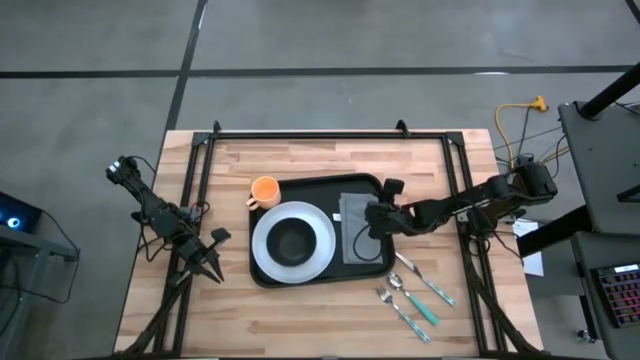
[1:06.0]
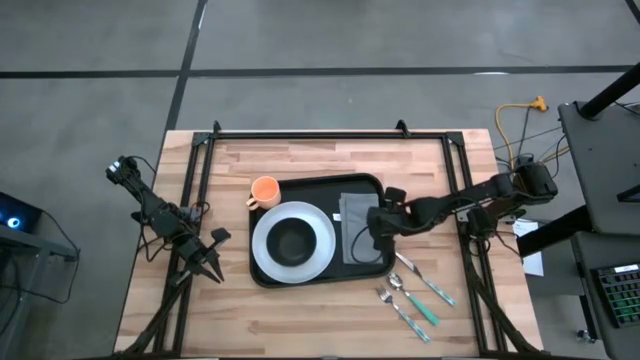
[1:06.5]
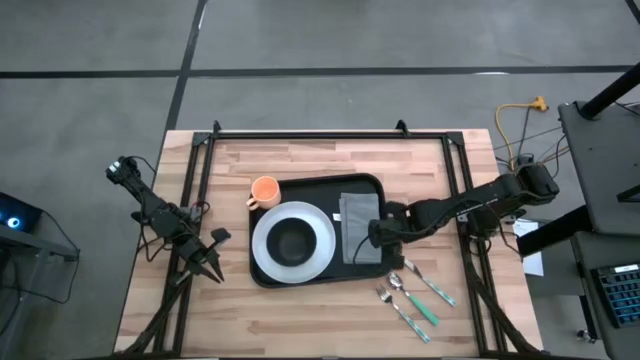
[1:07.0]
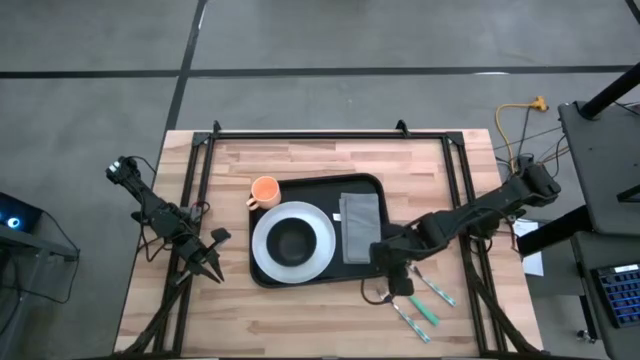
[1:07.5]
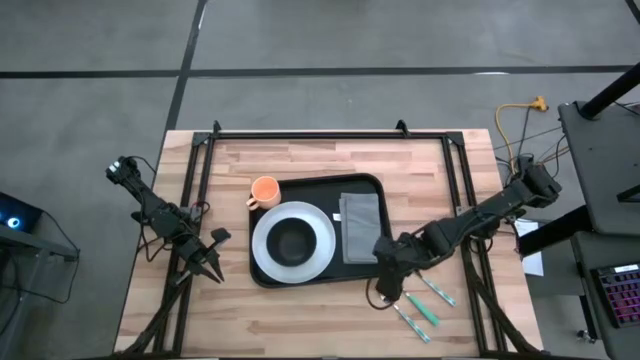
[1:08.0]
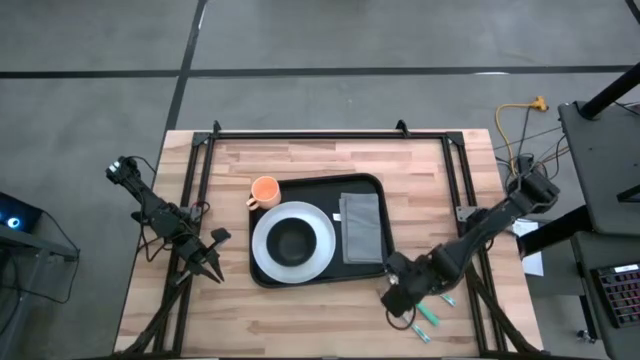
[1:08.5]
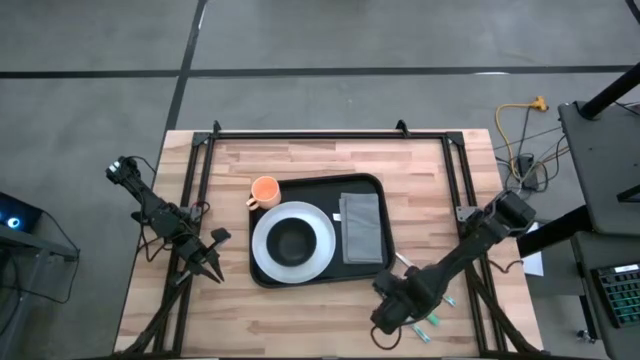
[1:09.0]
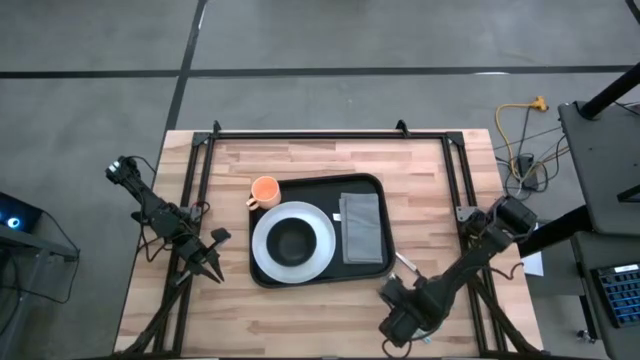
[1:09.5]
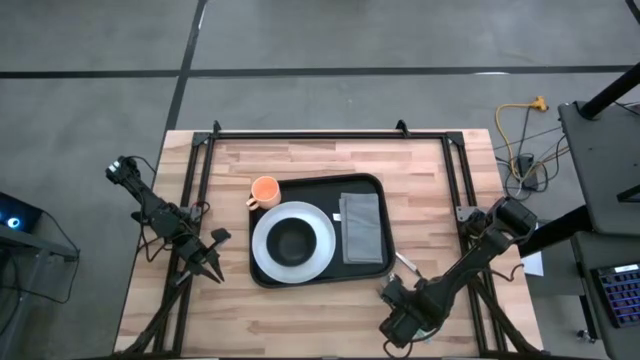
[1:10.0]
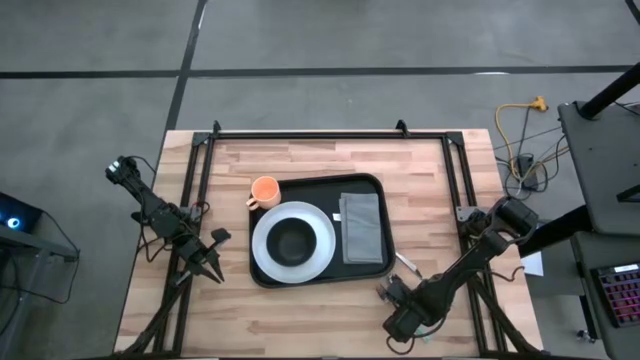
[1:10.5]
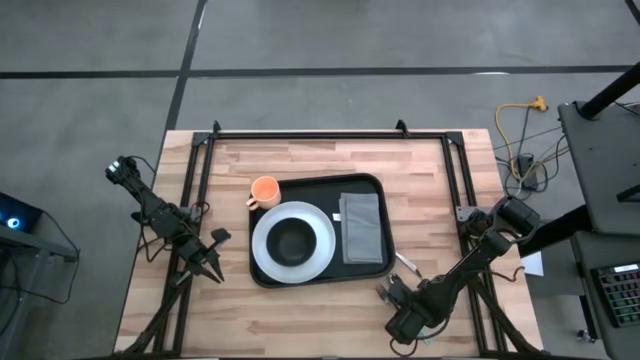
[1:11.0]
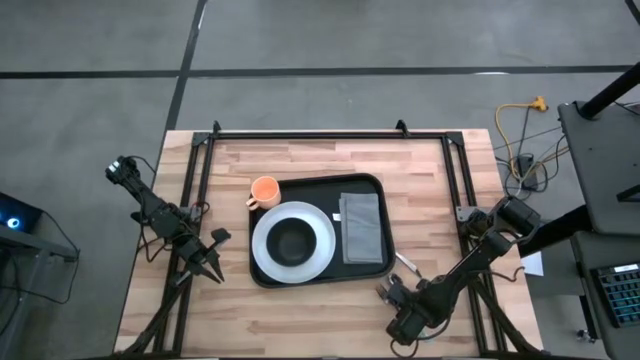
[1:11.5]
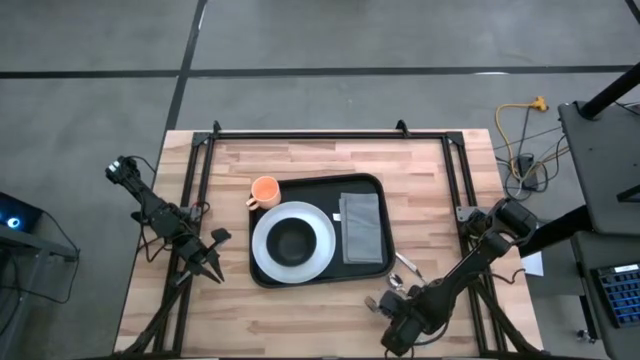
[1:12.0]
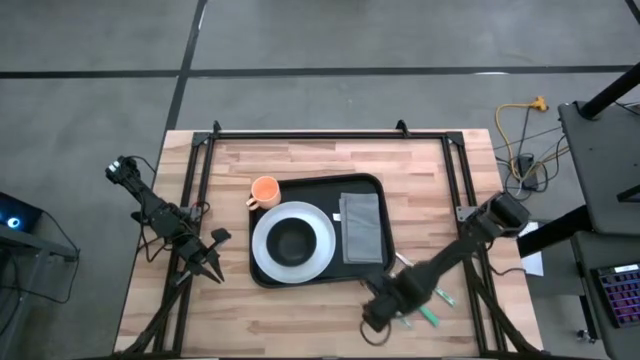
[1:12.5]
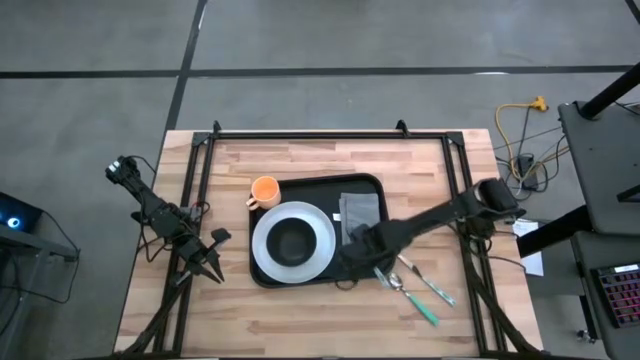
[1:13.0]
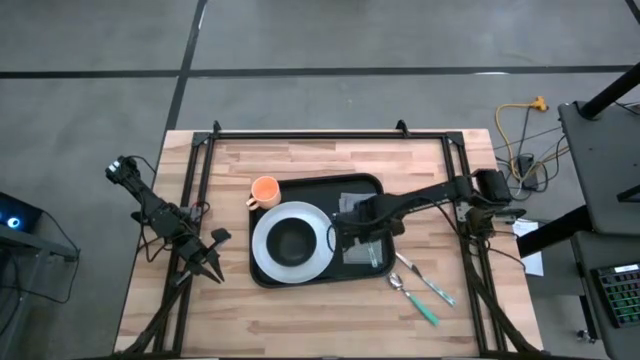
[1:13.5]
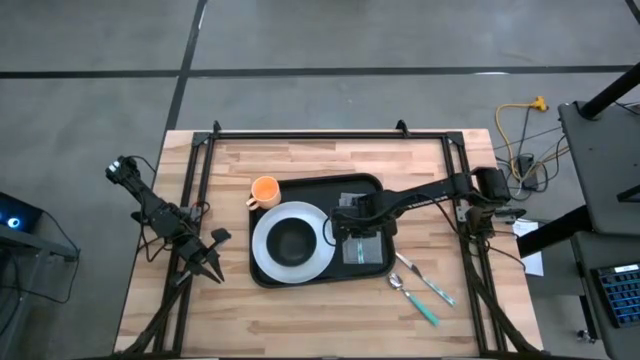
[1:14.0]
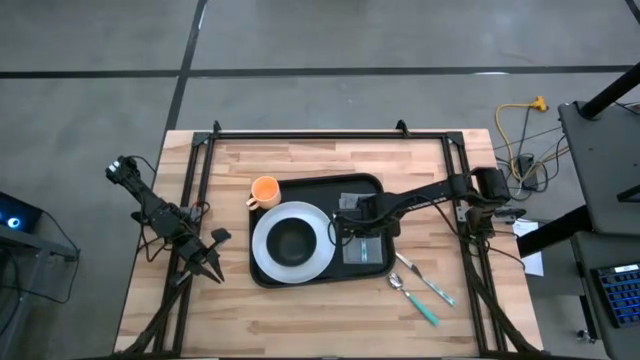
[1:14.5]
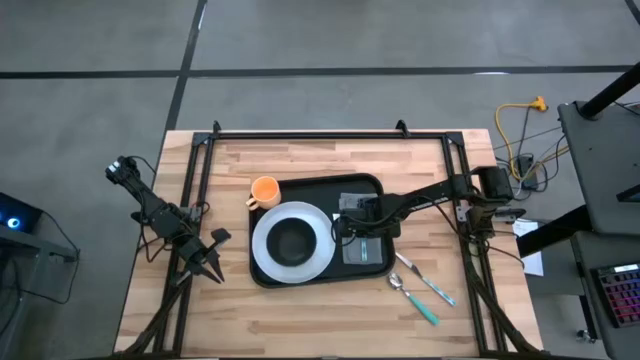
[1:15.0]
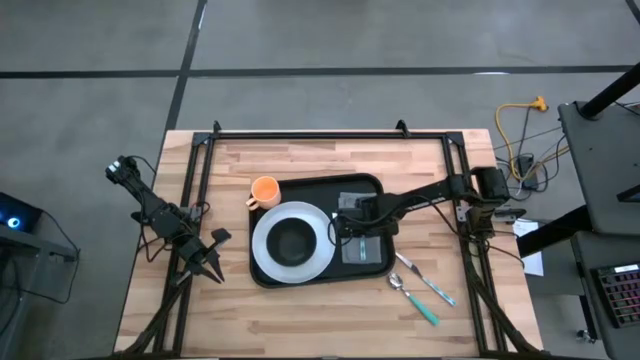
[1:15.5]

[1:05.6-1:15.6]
Task: Set up tray
Put the blue fork on the gray napkin to the right of the white plate

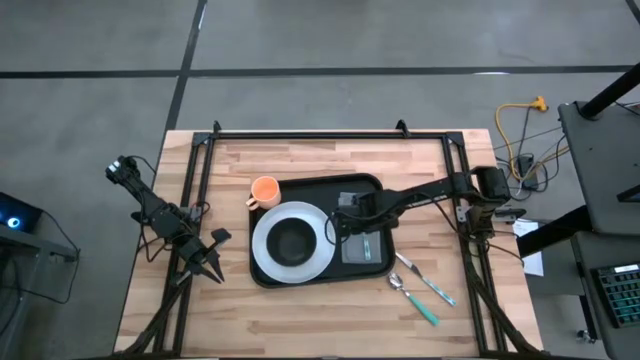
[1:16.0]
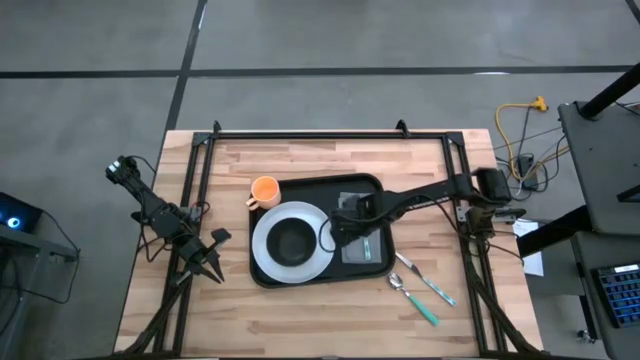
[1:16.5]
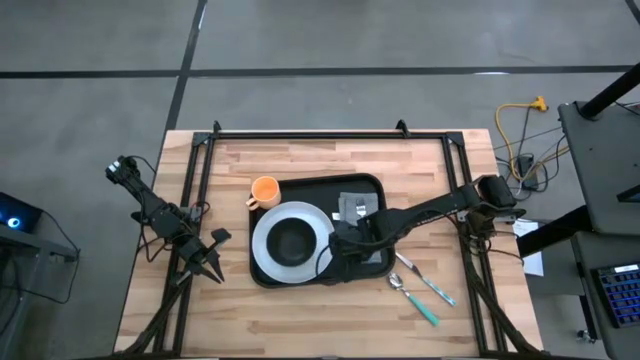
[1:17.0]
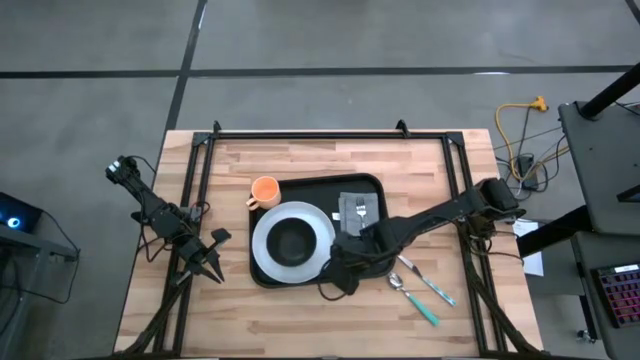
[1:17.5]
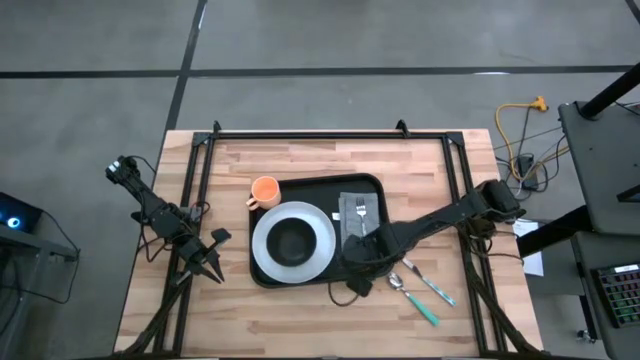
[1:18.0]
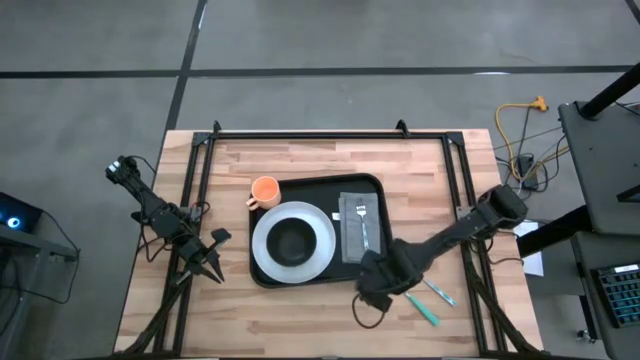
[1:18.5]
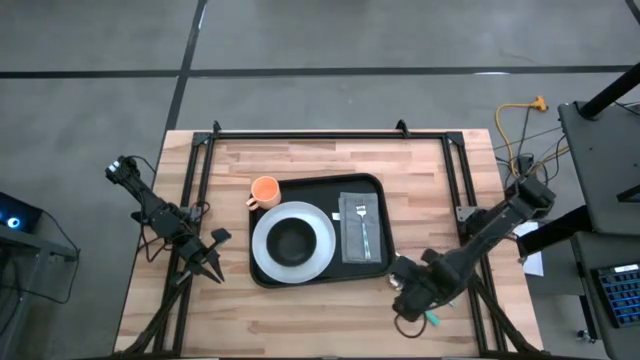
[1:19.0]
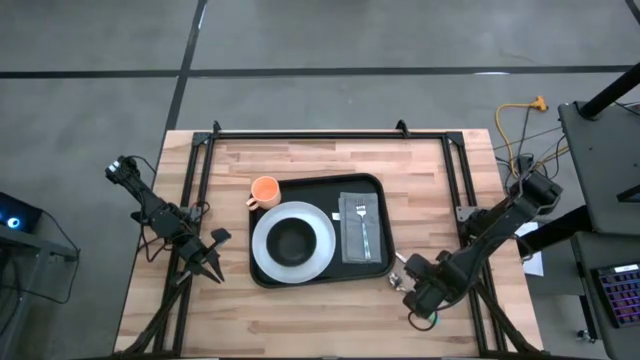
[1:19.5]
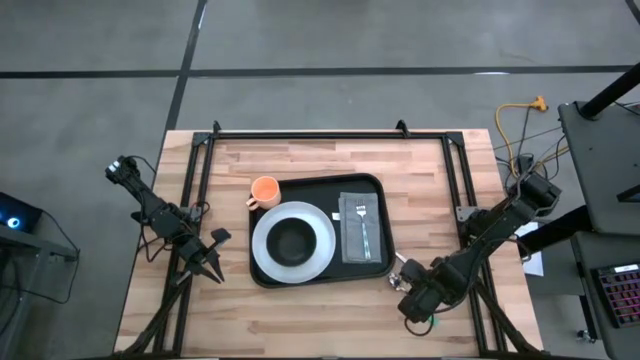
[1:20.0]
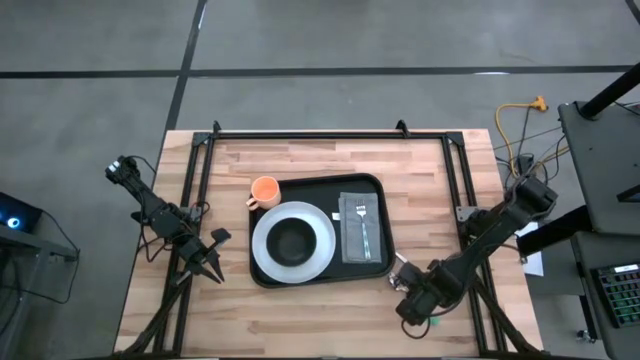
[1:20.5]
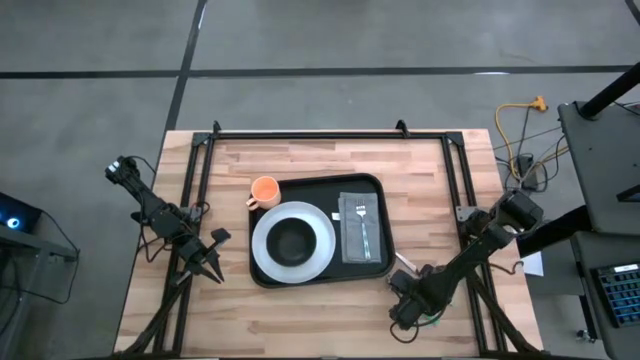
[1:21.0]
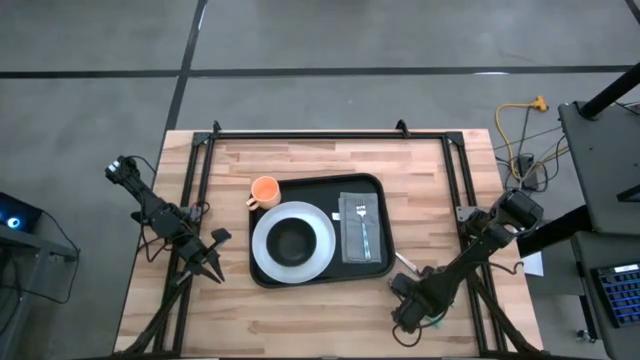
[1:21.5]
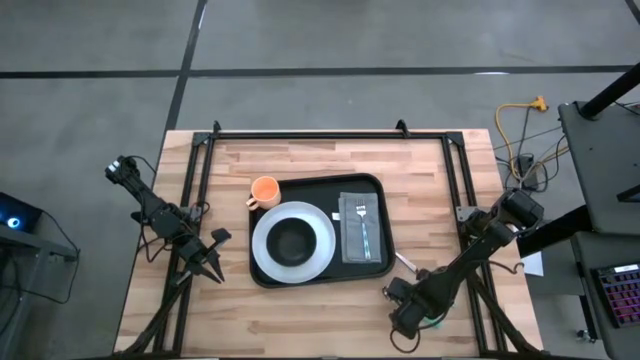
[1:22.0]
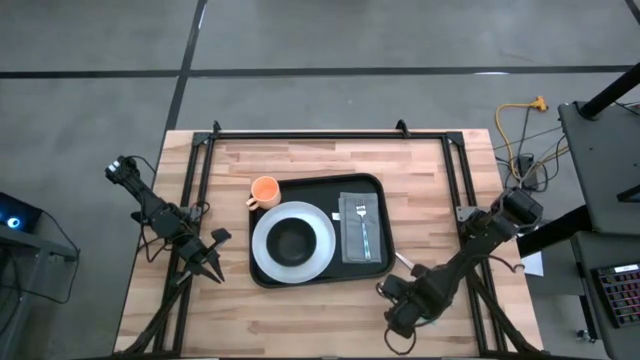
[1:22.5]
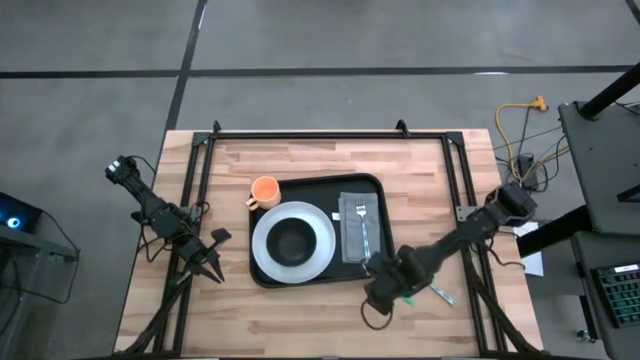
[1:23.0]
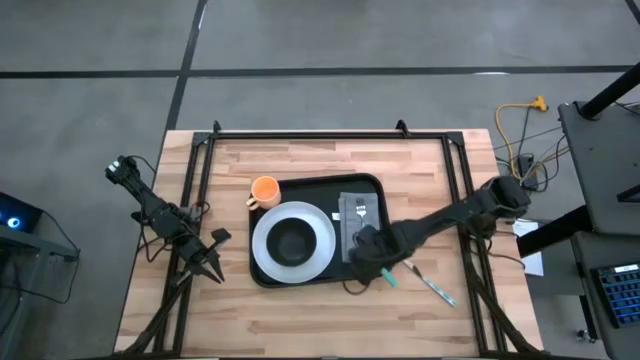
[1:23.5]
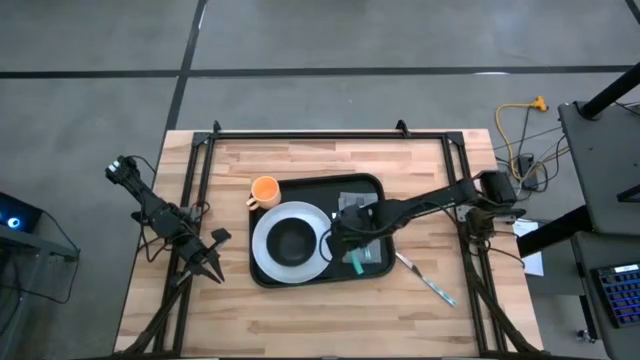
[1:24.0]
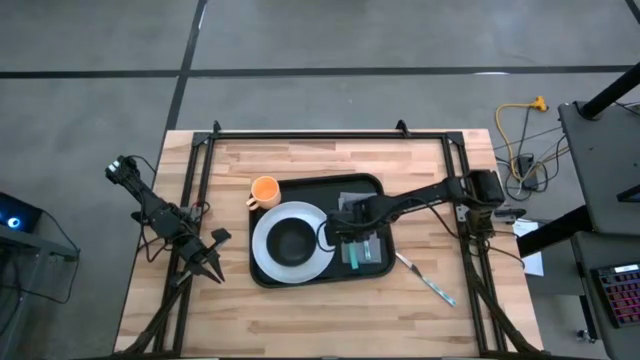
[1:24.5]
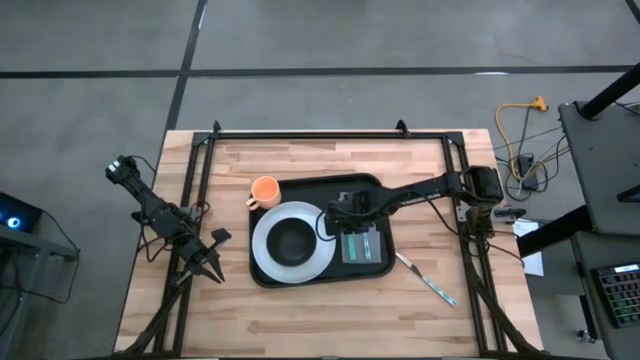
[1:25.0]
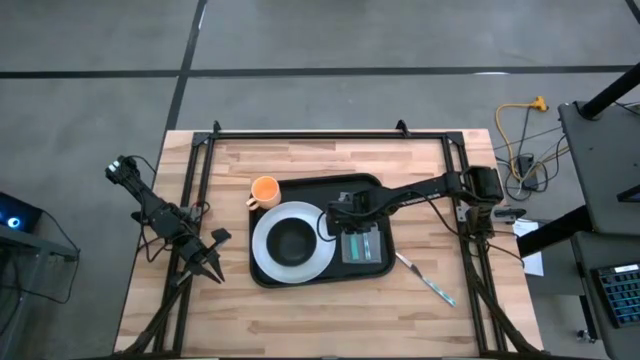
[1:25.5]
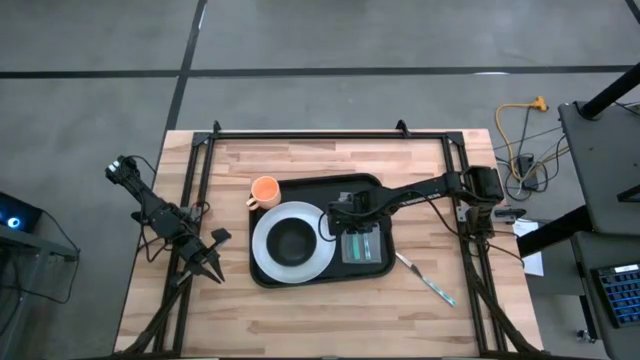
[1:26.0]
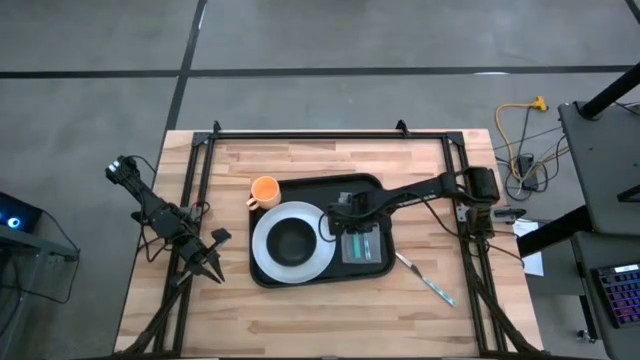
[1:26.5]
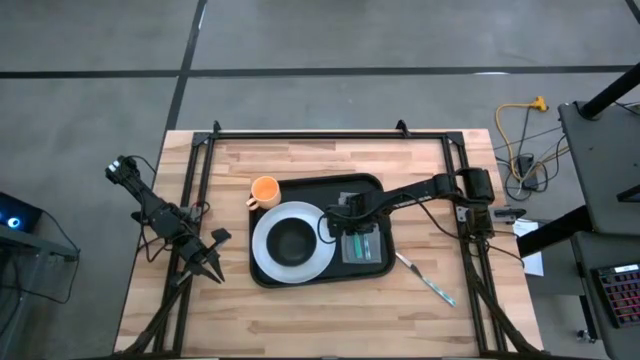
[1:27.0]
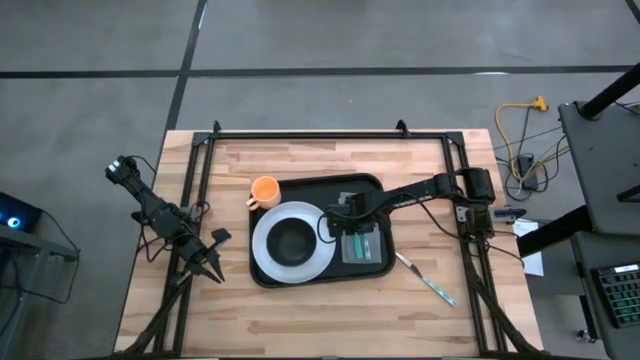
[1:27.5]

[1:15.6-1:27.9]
Put the blue spoon on the gray napkin to the left of the blue fork
